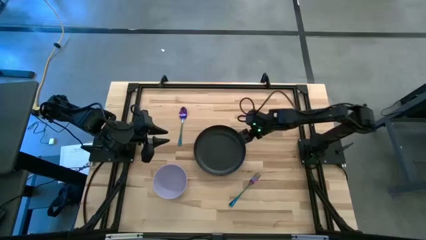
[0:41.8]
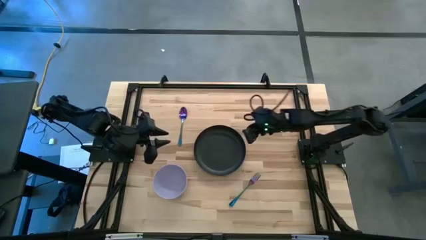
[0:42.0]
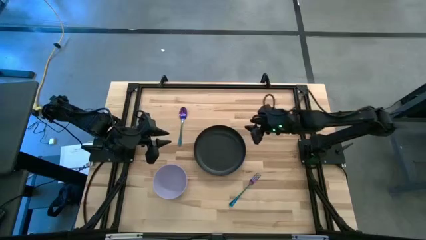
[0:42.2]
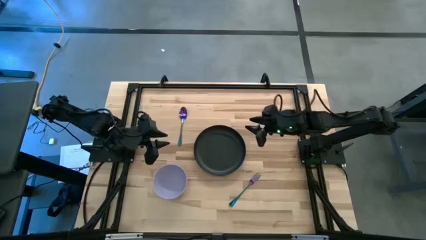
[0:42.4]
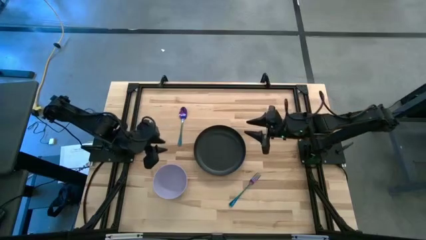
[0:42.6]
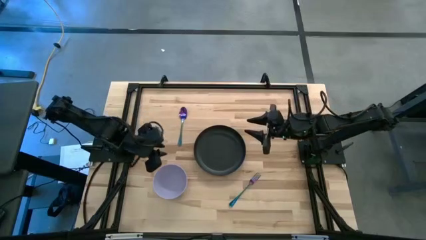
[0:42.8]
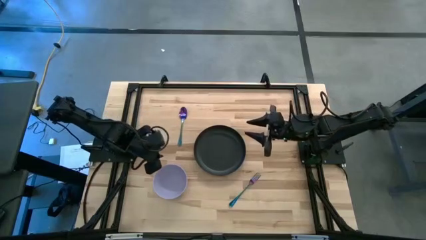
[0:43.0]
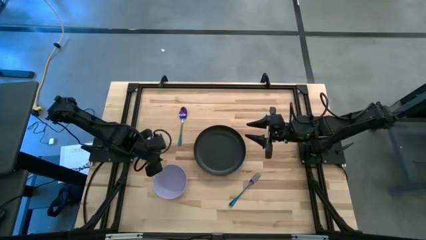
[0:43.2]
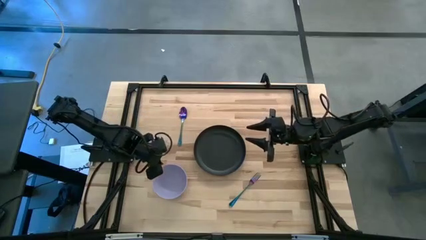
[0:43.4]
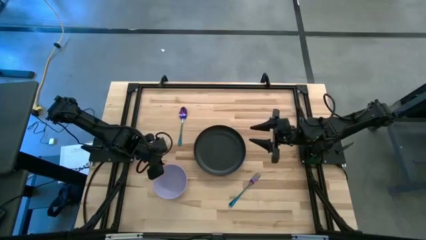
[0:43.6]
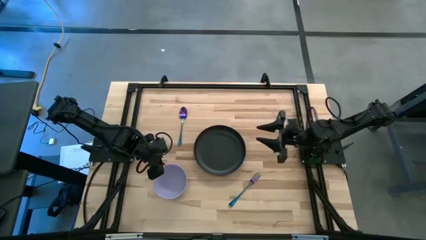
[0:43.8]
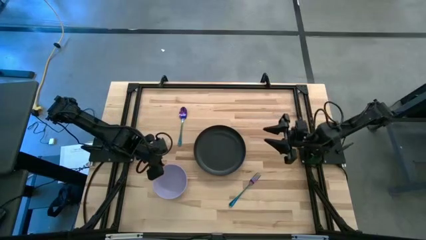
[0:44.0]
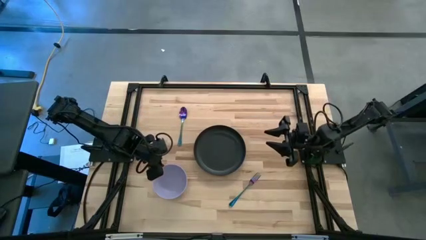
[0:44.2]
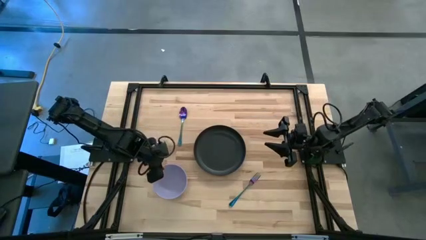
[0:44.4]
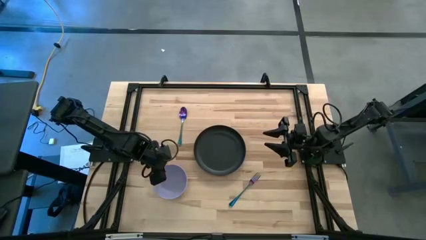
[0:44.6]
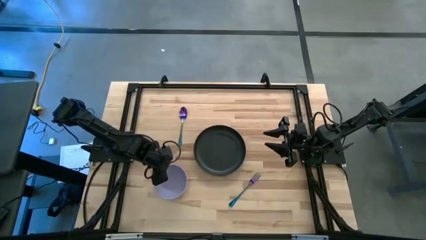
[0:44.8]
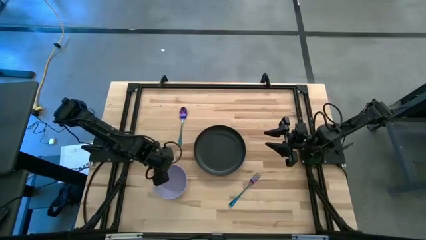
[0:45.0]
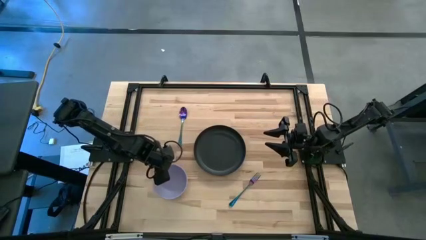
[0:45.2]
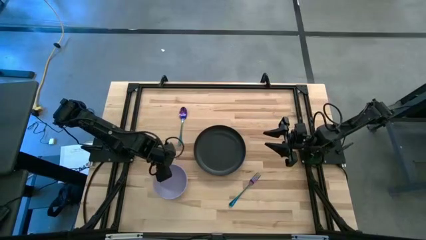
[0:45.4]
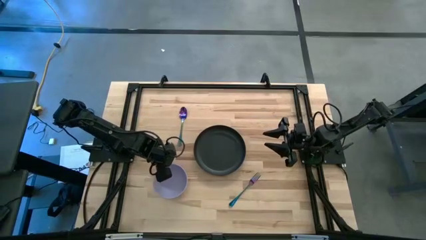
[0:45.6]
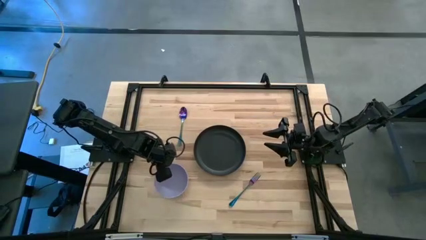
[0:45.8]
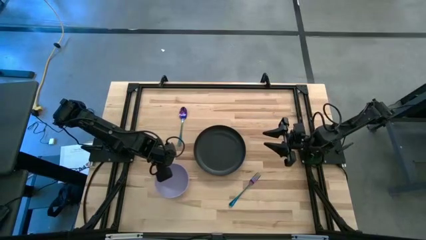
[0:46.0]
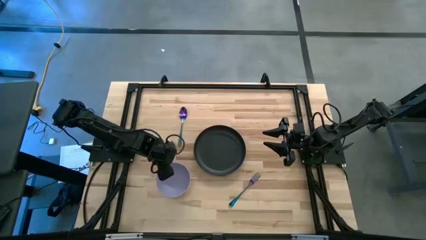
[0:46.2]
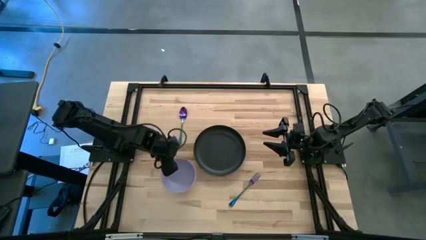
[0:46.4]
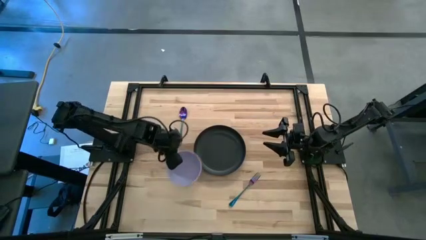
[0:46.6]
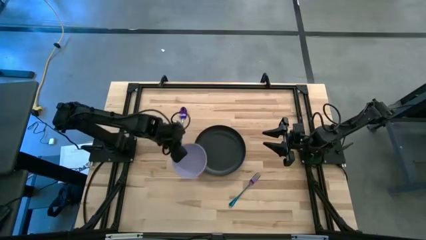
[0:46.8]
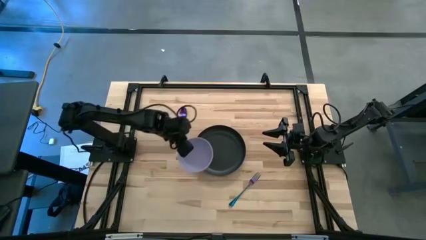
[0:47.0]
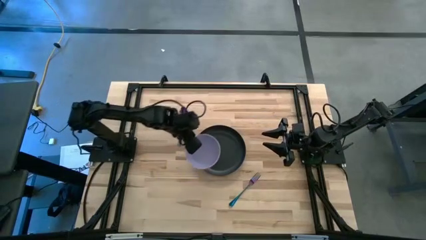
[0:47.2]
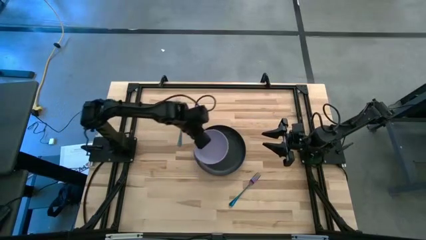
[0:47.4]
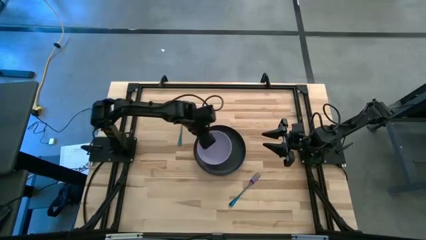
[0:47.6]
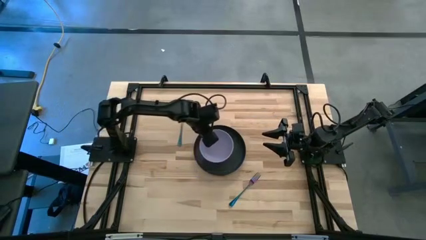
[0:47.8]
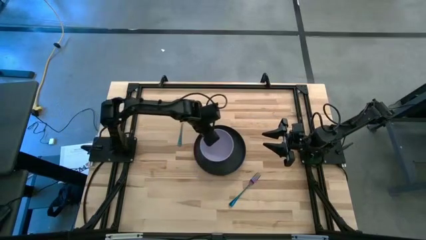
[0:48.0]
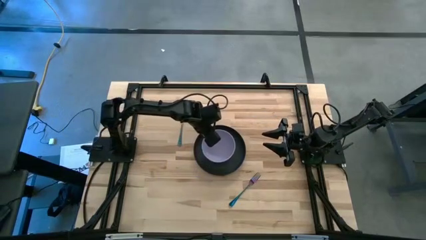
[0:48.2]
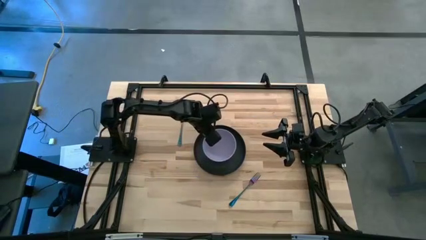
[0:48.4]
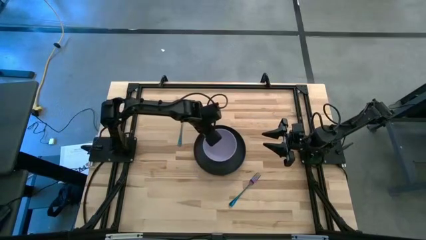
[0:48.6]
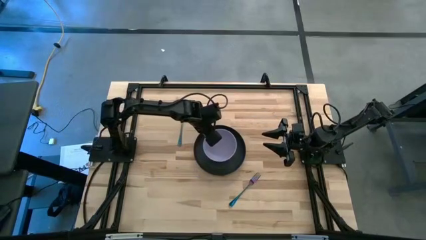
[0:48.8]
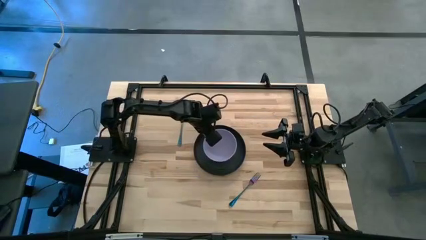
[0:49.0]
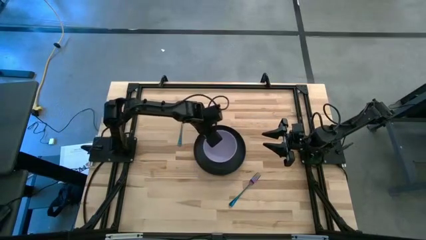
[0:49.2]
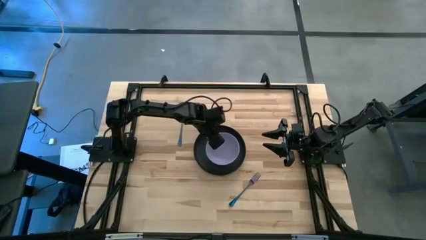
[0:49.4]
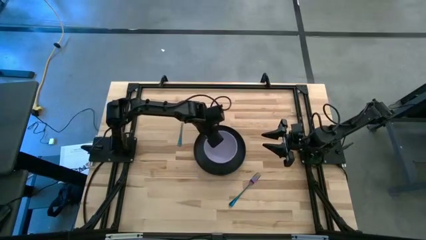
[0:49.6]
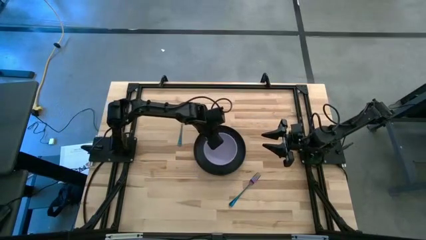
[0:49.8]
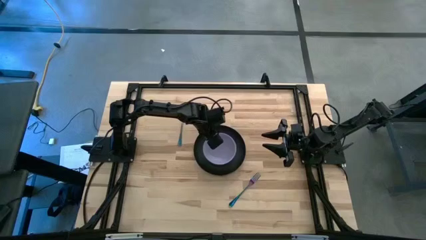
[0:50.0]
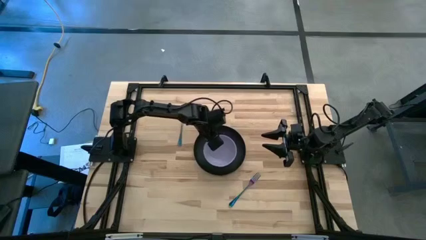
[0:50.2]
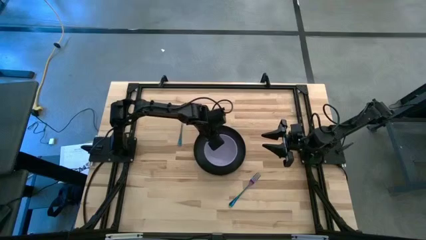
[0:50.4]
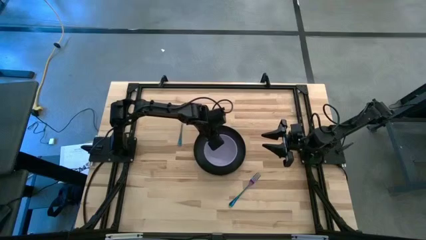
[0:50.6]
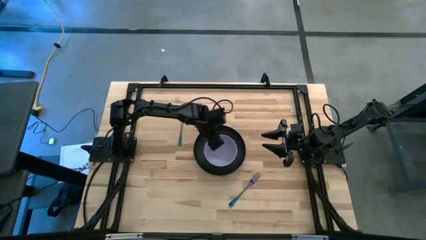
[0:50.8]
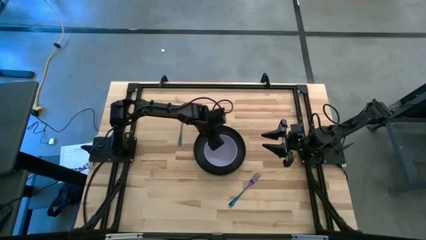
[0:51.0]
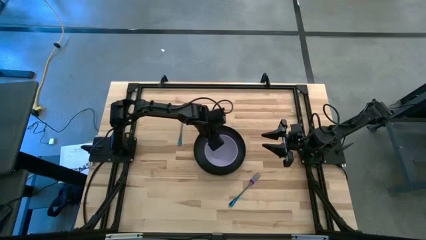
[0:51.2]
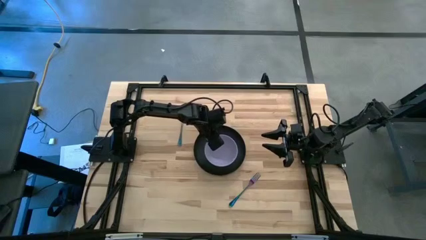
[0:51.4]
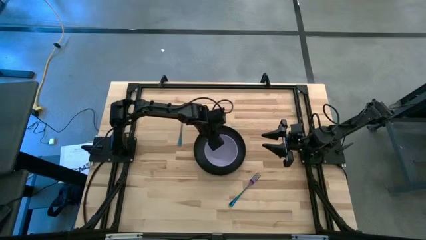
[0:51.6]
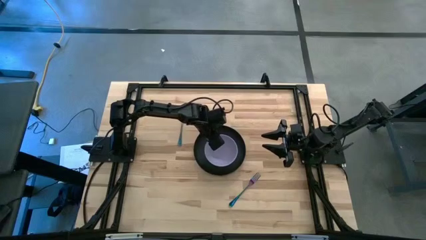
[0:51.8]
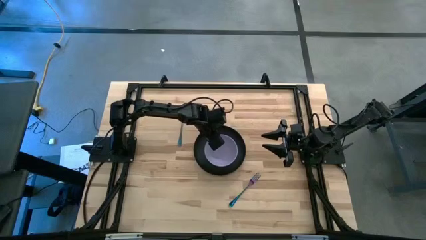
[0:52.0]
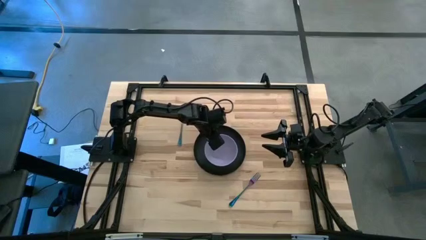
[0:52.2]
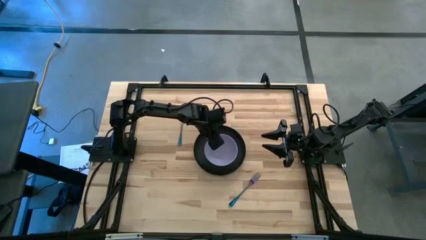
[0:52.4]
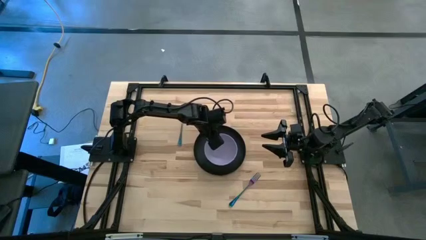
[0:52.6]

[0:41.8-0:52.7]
Task: Set table place
Put the violet bowl on the black plate

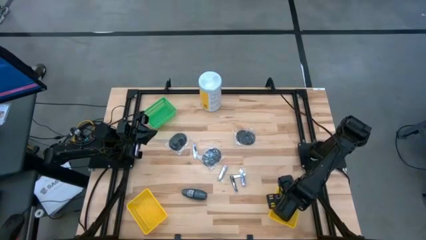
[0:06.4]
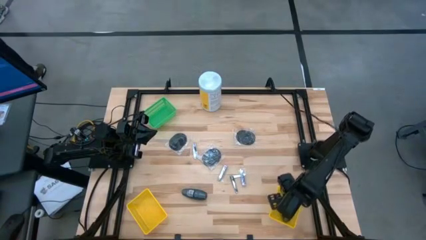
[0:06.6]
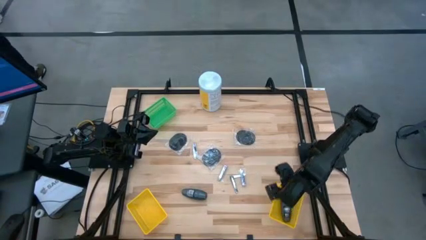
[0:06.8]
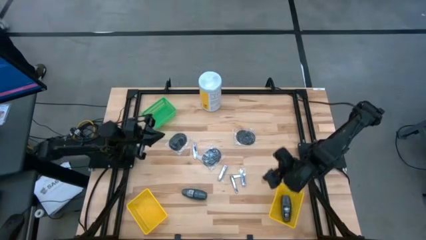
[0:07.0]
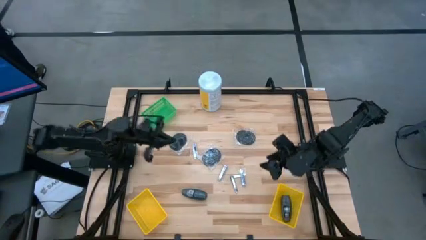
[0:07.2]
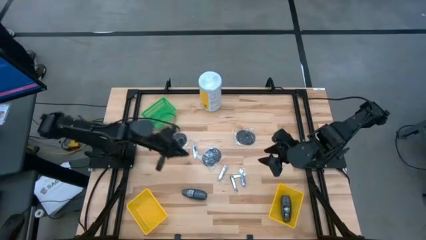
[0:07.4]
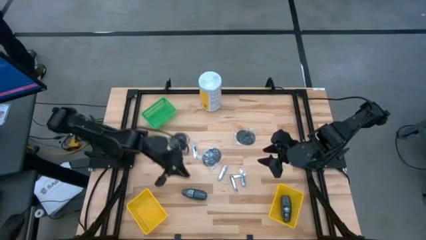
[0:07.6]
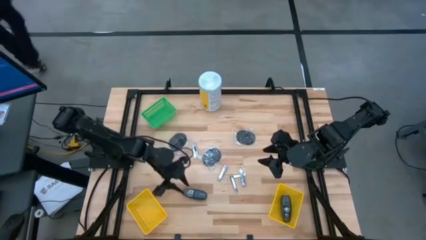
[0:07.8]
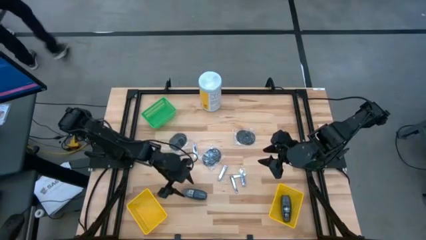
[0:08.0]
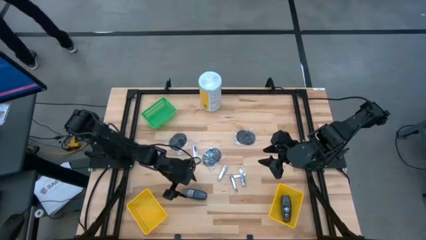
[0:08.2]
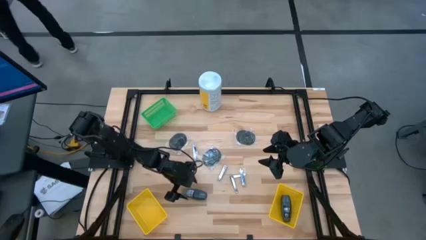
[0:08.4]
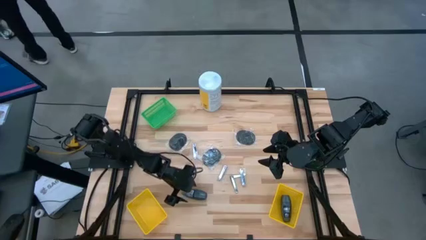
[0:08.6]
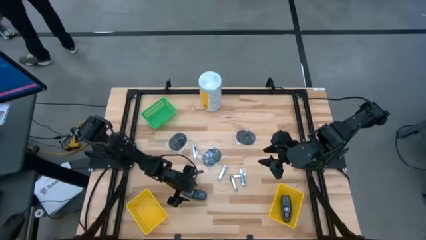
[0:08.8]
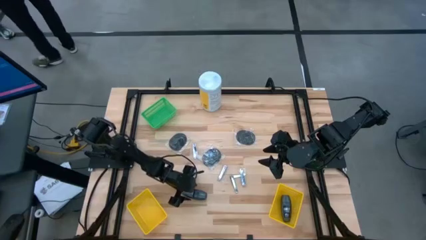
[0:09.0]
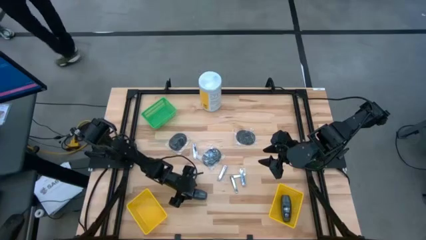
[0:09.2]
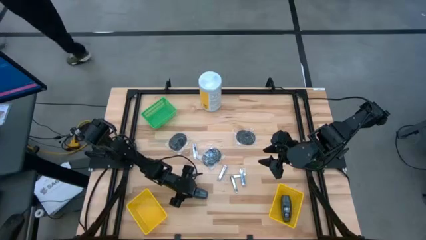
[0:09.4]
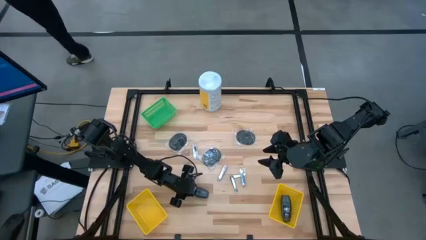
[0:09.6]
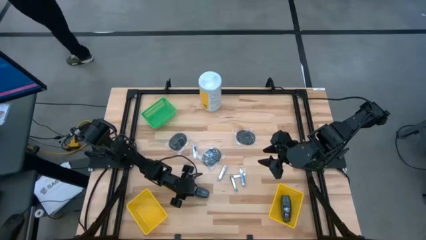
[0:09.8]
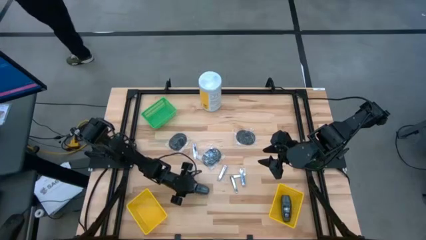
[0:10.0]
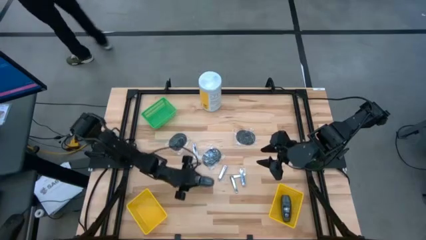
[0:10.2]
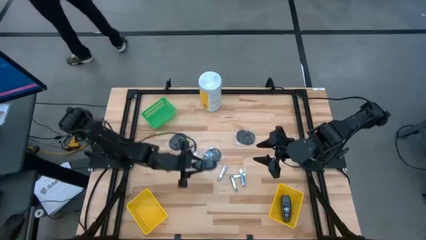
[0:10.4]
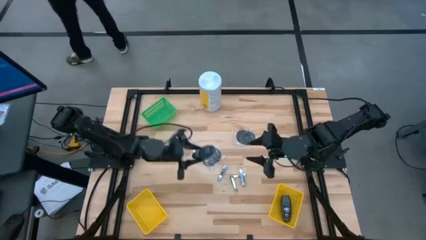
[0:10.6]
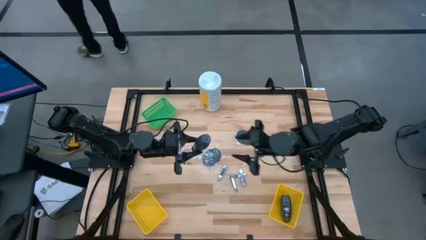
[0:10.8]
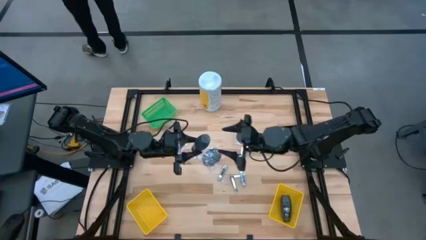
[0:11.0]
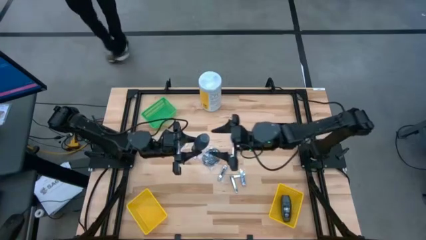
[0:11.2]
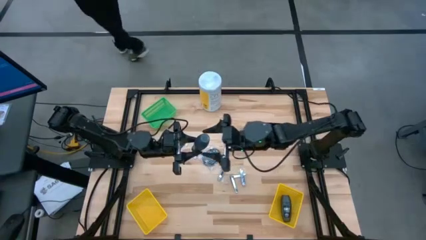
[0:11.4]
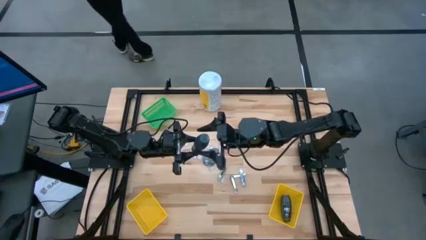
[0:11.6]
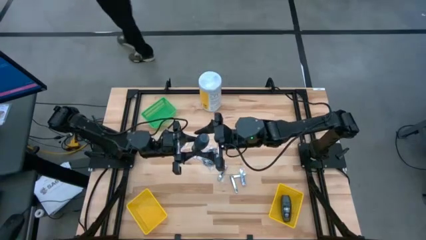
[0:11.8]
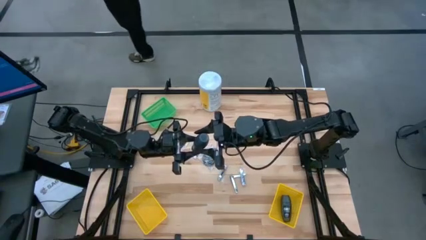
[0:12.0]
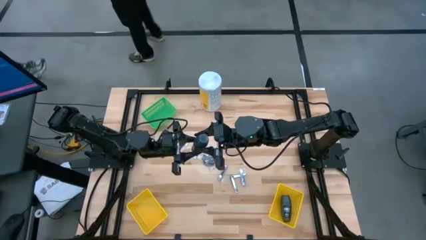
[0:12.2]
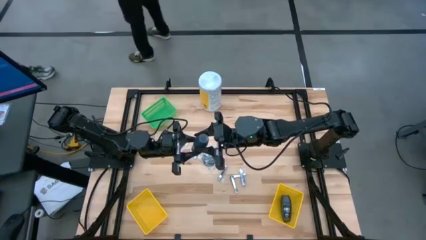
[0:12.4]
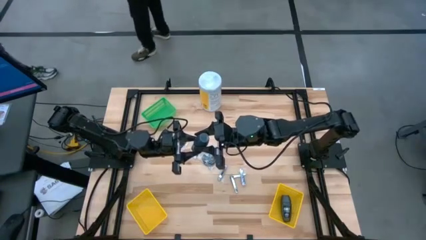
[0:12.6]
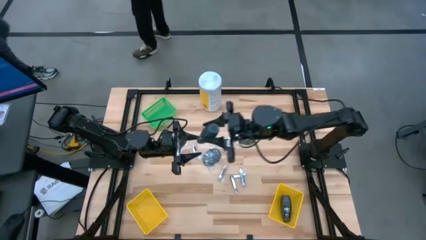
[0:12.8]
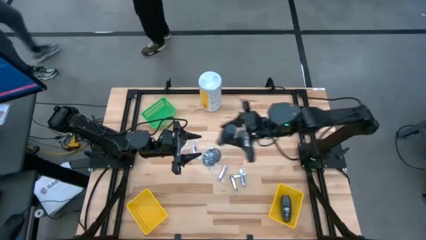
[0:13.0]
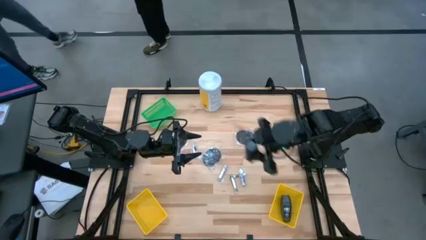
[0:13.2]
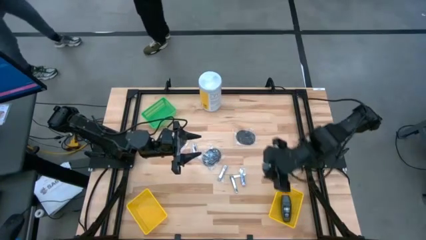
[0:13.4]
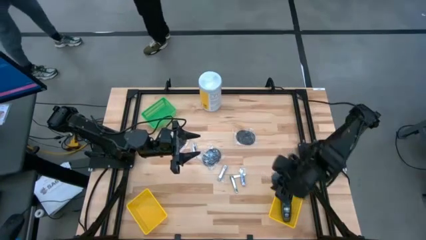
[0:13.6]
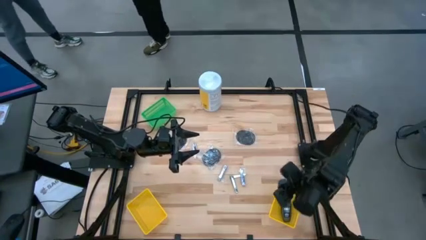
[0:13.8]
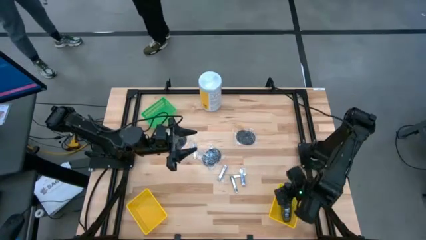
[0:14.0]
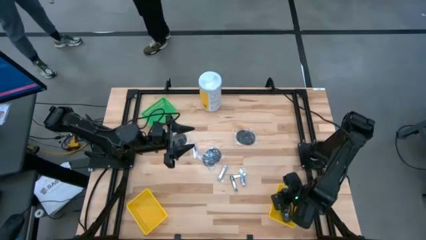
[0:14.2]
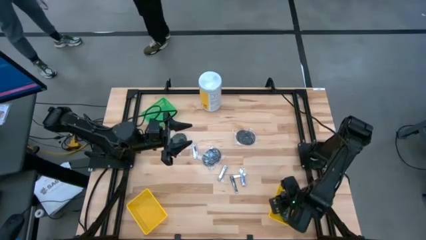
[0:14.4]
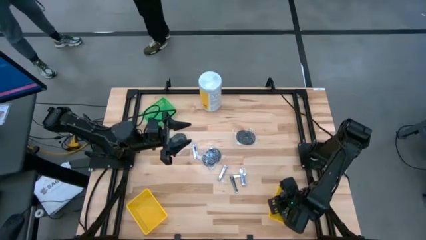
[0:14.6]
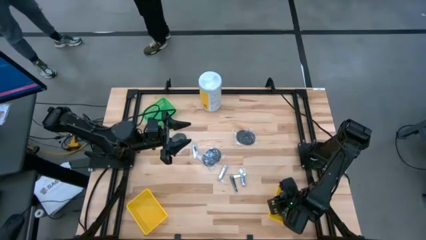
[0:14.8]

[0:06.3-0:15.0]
Task: Pick & Place Travel size toiletries
Put the gray deodorant into the right yellow bin
